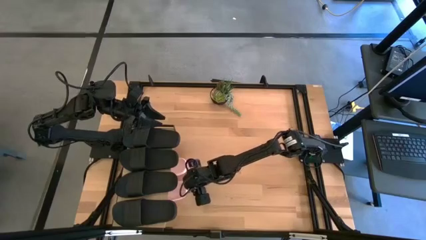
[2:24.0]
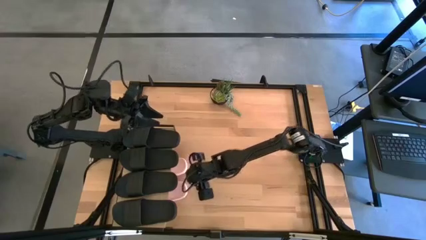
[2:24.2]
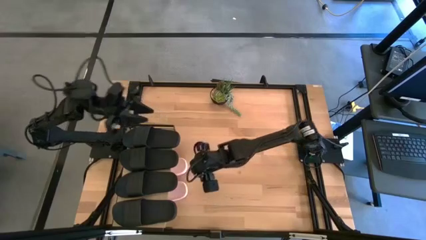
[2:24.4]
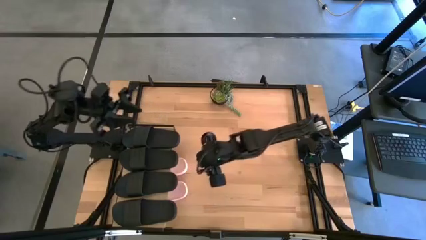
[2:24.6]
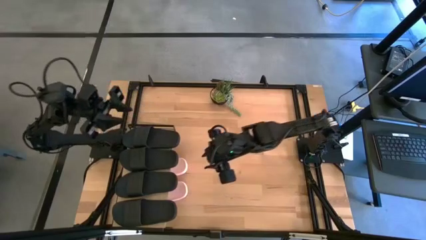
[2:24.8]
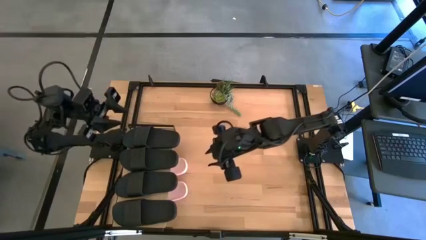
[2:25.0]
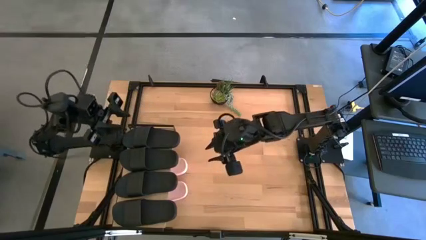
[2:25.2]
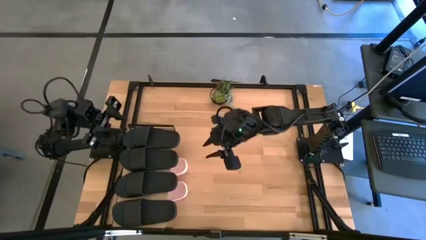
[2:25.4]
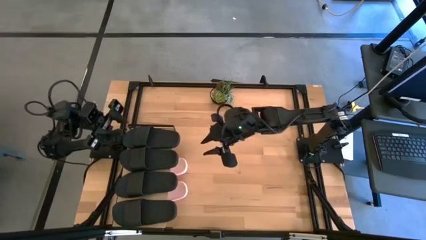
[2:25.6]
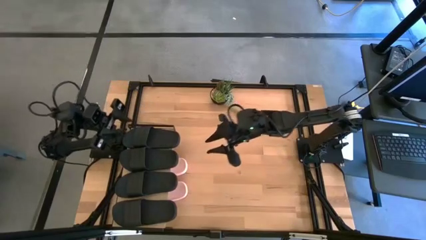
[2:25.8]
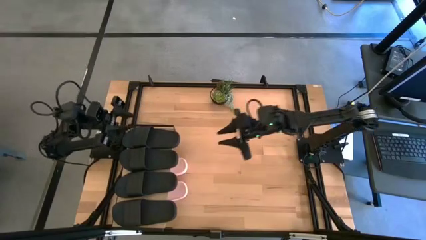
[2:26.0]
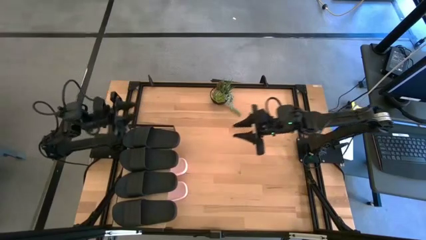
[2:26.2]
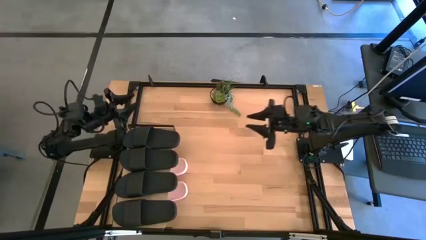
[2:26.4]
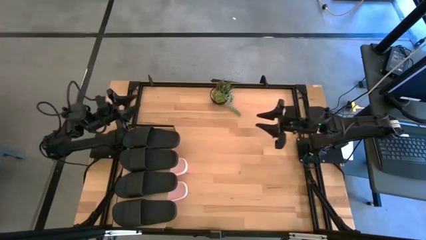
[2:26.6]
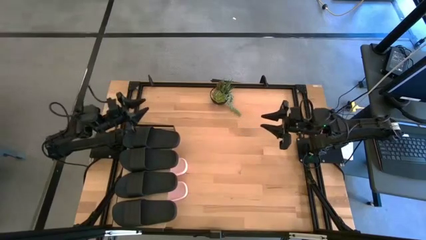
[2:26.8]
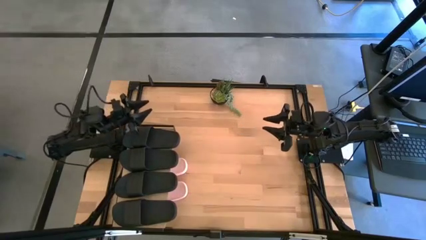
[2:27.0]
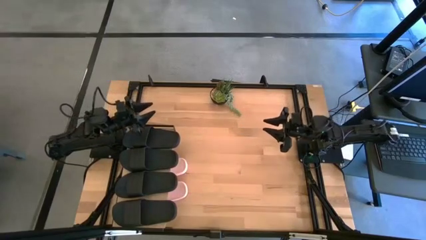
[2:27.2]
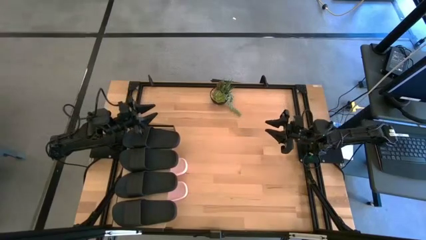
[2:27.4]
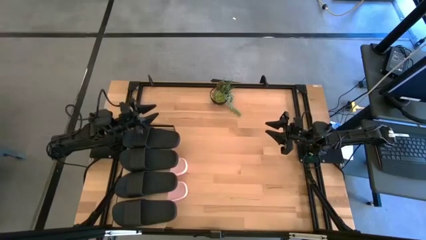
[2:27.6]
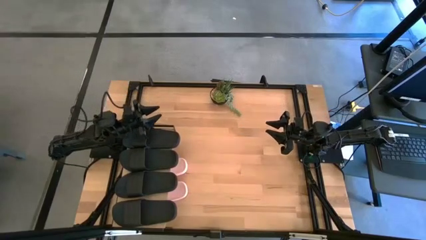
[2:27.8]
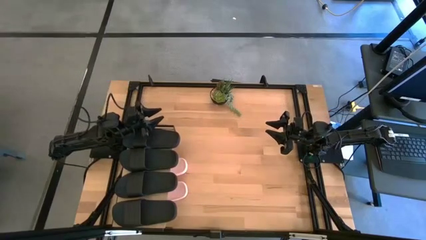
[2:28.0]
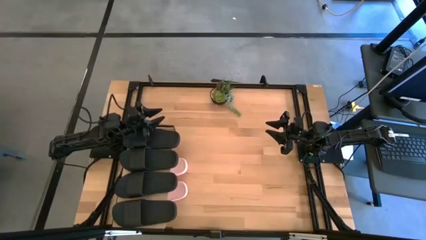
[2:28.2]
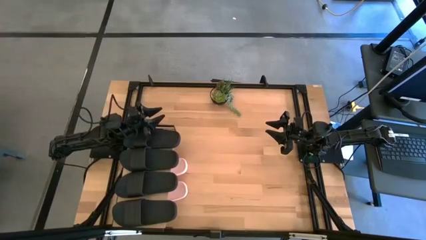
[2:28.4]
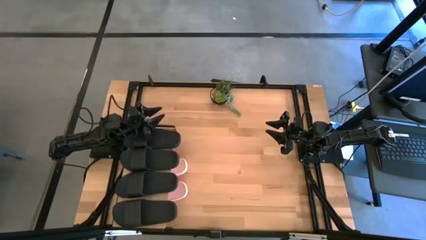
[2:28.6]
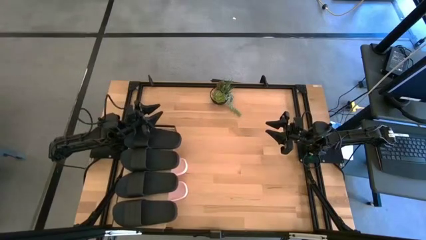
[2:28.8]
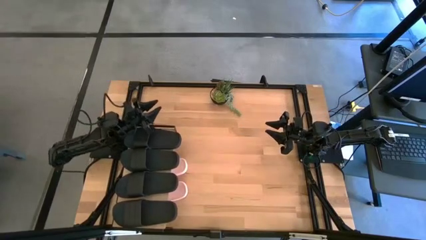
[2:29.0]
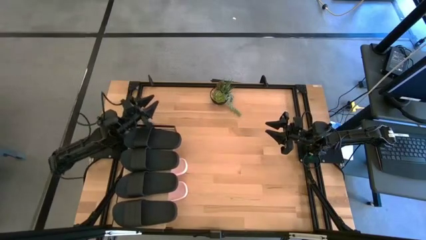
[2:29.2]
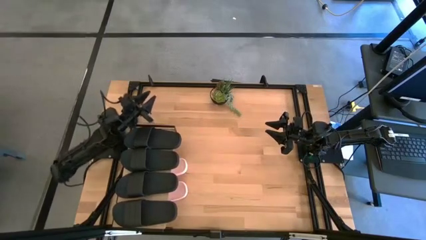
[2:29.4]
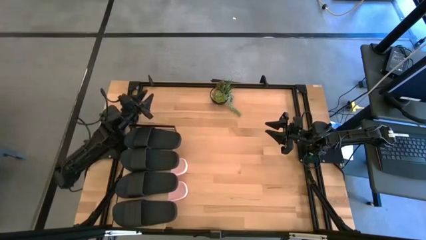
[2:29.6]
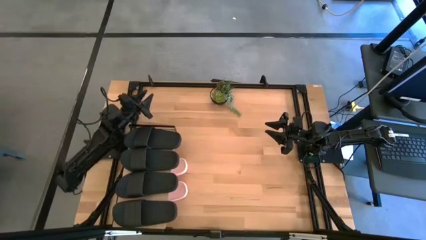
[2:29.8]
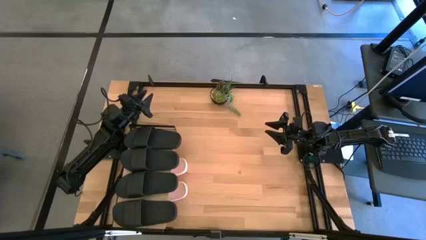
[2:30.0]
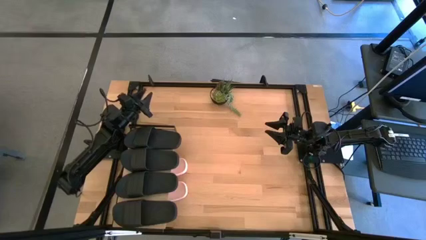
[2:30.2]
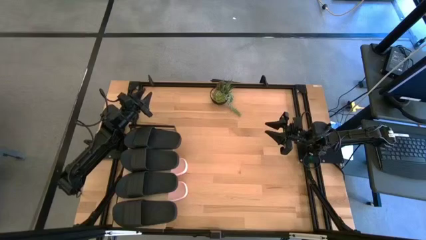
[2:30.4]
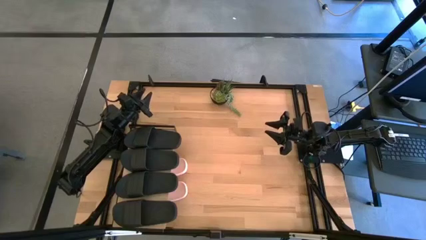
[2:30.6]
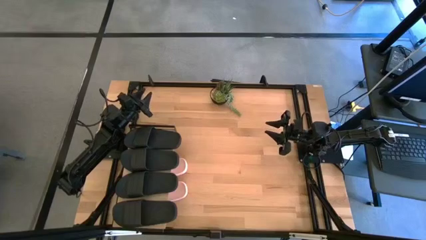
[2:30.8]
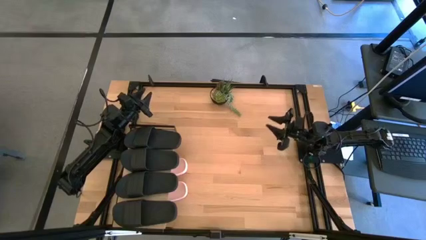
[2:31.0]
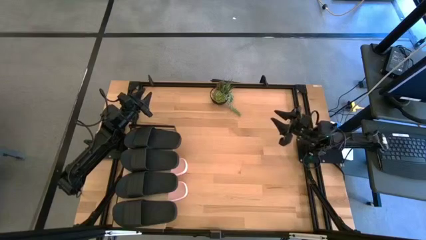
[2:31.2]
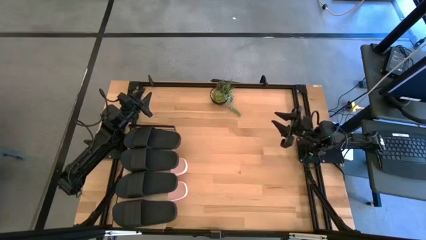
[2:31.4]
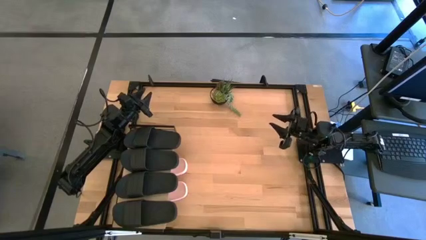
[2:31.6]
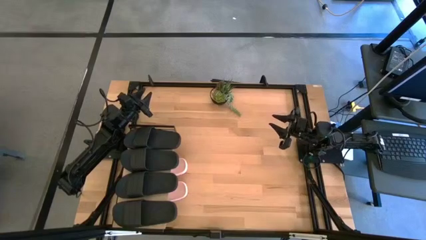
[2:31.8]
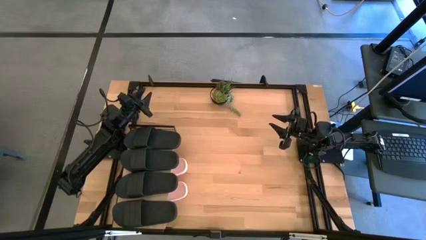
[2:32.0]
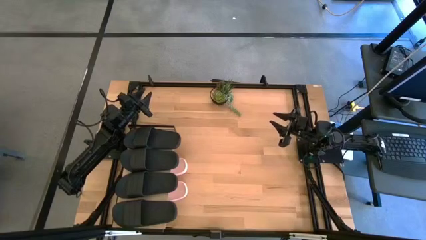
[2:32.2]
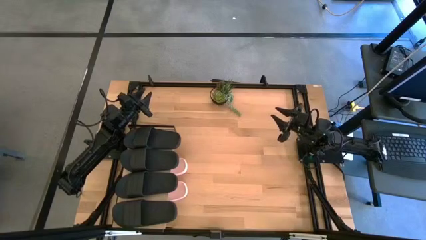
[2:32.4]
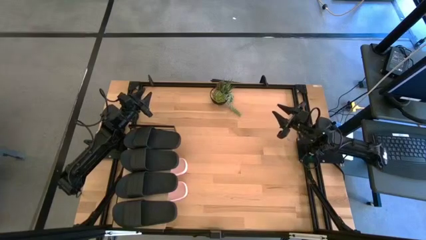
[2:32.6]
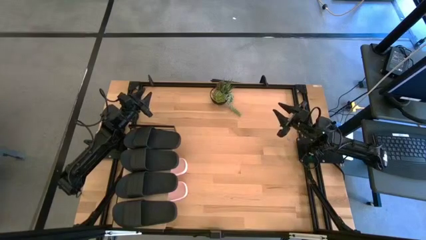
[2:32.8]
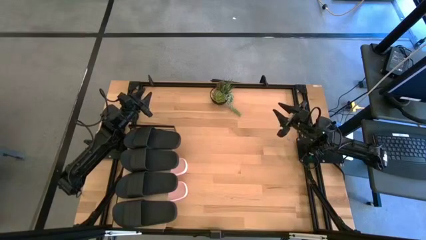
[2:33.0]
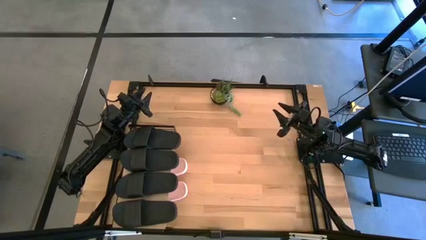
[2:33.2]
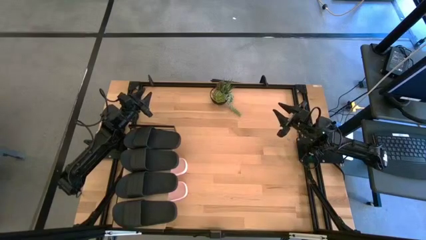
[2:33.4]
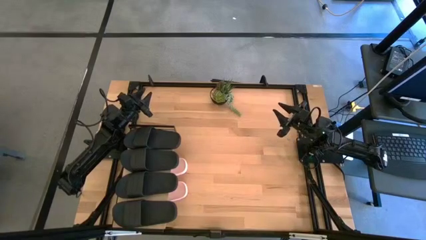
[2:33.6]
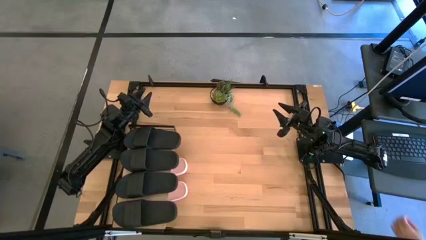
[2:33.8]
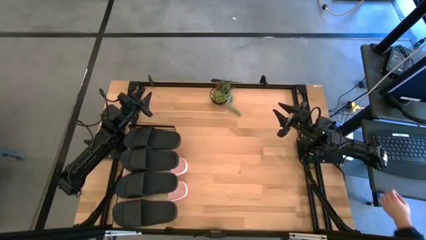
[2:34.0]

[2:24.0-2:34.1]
Task: Pick and place slides into the shelf
Return to Home Position
